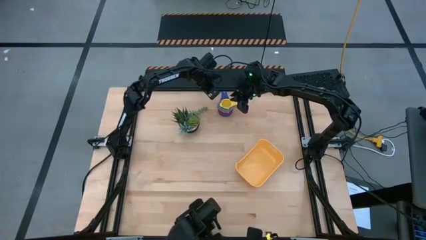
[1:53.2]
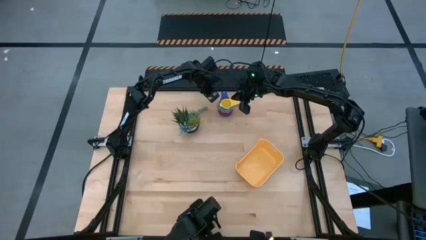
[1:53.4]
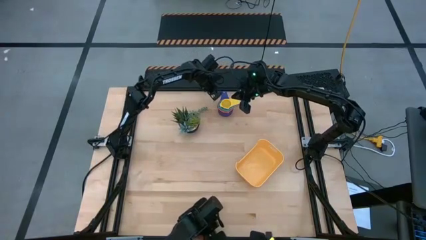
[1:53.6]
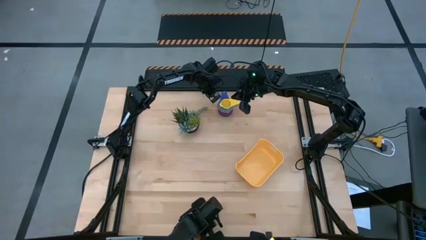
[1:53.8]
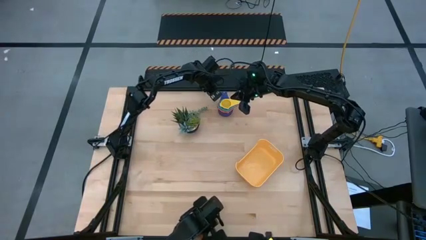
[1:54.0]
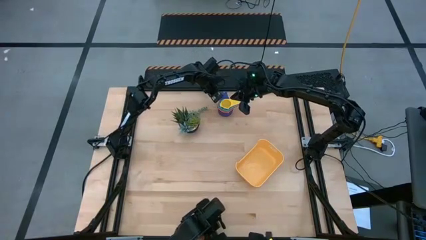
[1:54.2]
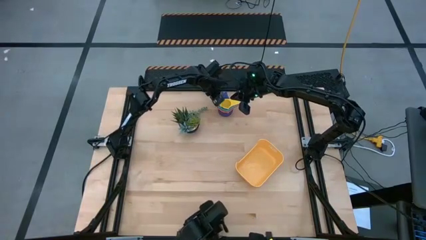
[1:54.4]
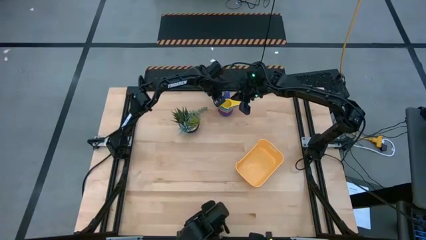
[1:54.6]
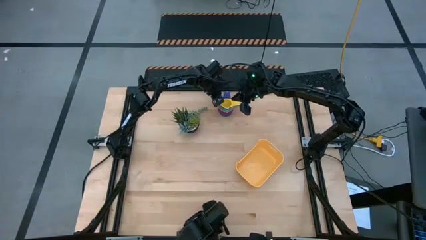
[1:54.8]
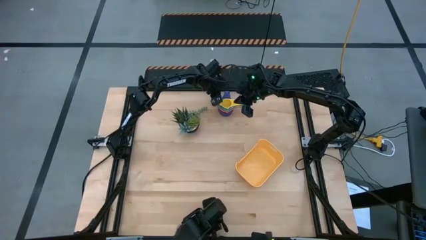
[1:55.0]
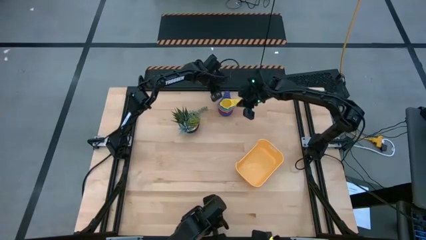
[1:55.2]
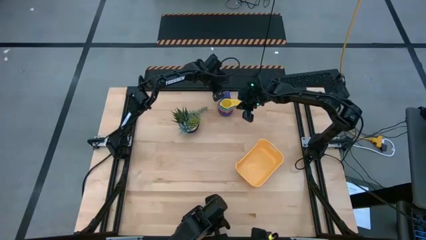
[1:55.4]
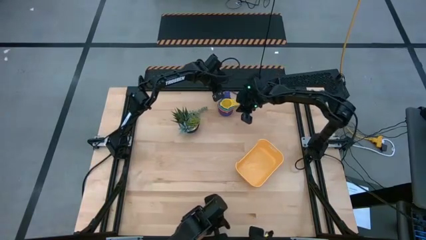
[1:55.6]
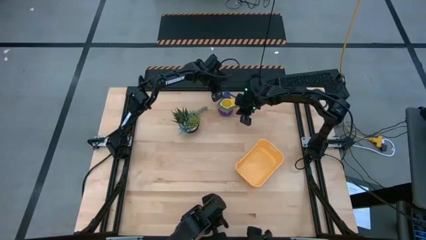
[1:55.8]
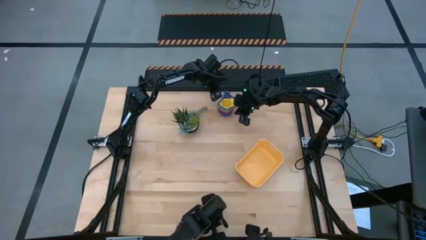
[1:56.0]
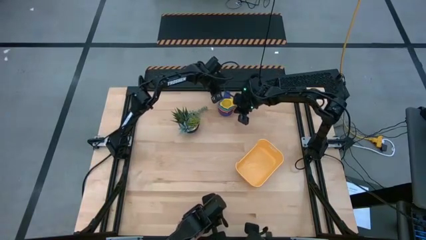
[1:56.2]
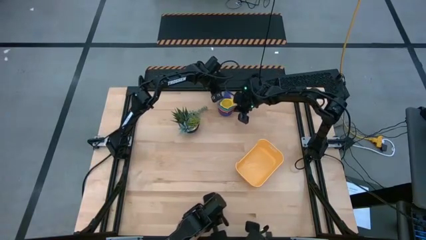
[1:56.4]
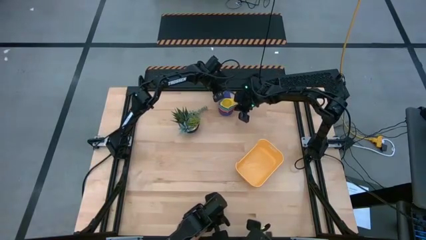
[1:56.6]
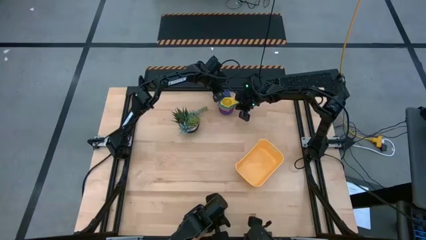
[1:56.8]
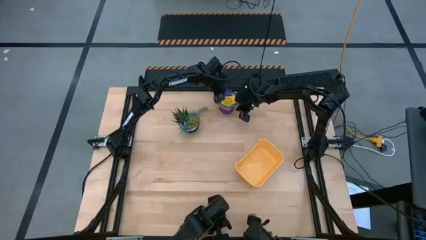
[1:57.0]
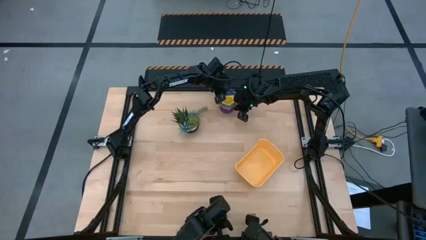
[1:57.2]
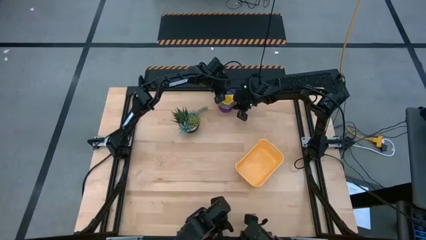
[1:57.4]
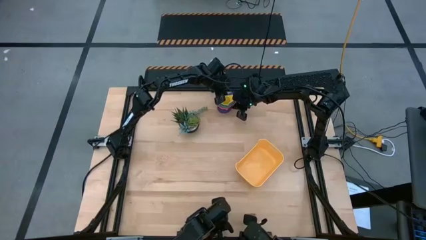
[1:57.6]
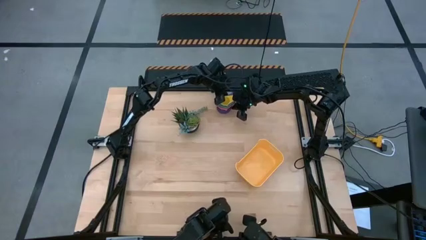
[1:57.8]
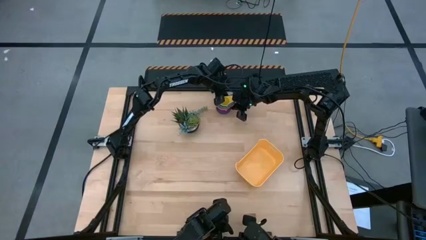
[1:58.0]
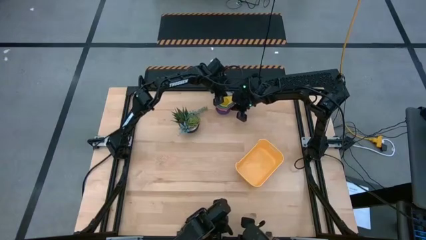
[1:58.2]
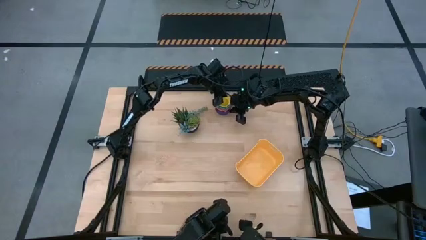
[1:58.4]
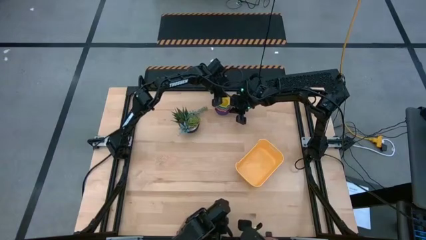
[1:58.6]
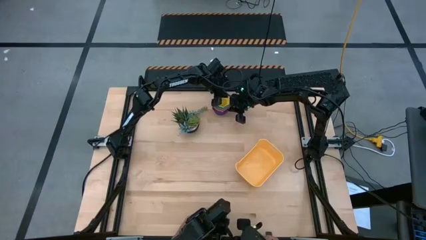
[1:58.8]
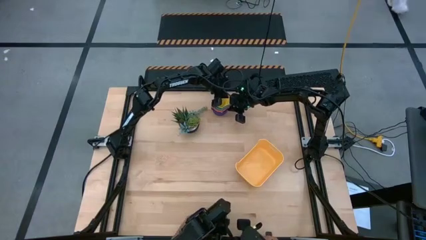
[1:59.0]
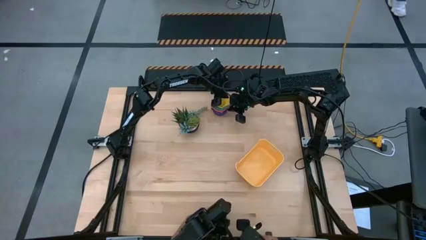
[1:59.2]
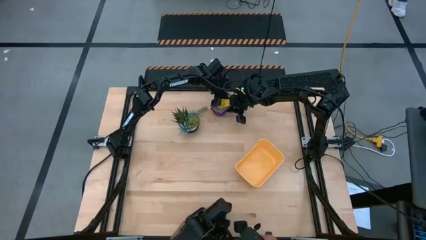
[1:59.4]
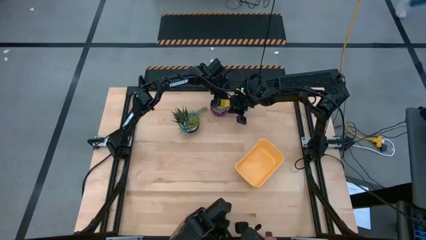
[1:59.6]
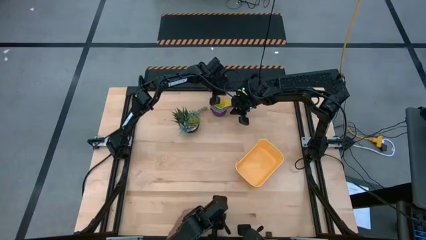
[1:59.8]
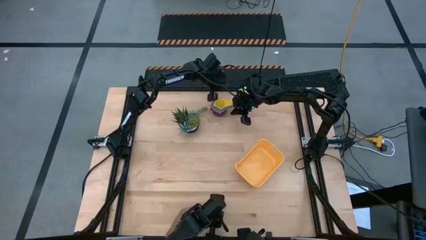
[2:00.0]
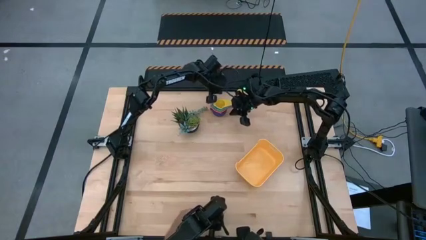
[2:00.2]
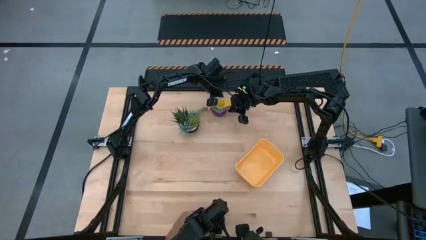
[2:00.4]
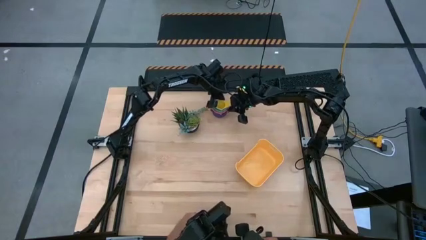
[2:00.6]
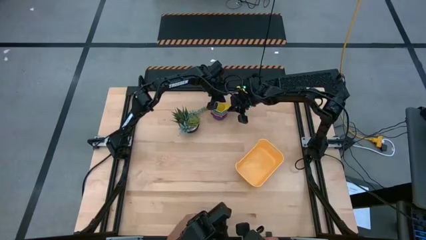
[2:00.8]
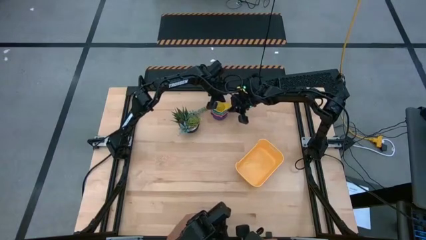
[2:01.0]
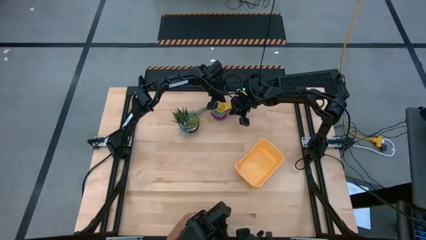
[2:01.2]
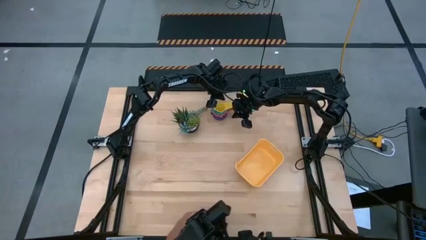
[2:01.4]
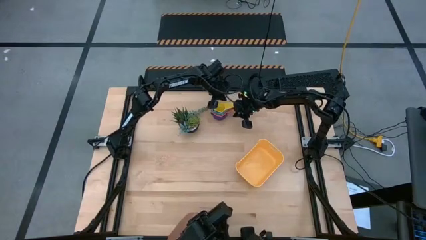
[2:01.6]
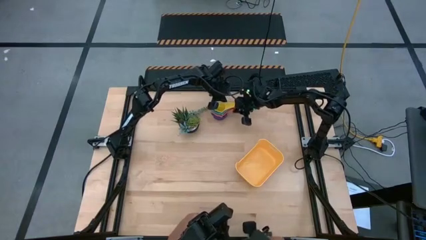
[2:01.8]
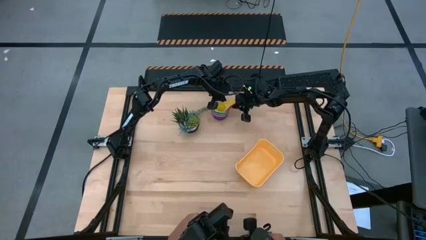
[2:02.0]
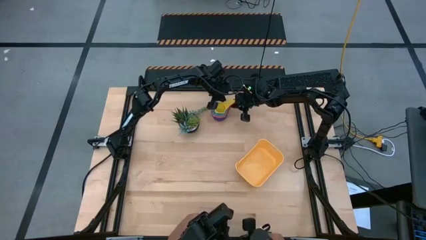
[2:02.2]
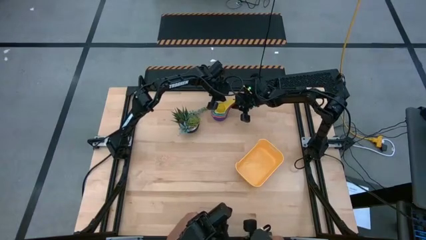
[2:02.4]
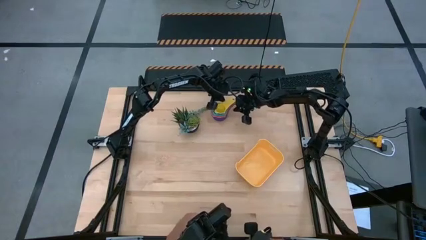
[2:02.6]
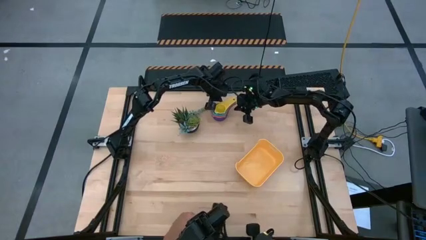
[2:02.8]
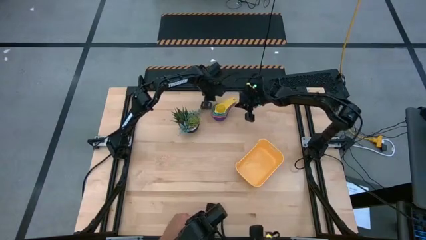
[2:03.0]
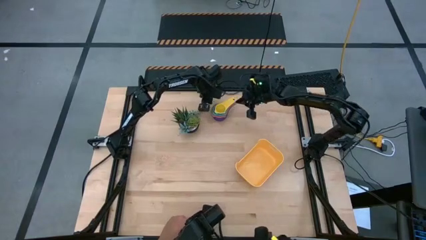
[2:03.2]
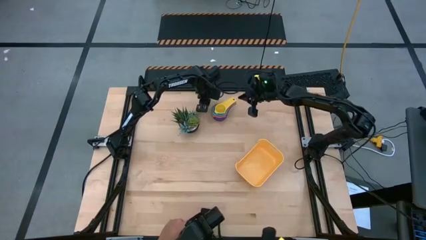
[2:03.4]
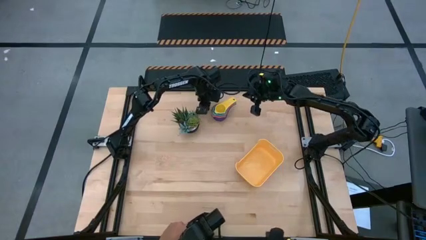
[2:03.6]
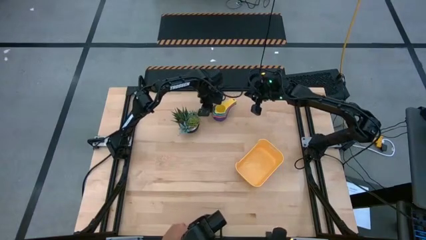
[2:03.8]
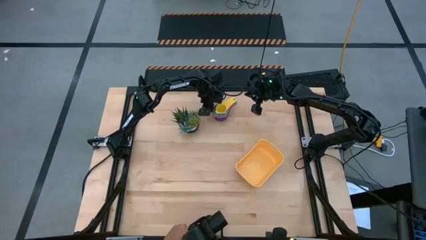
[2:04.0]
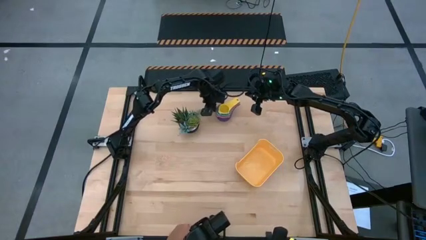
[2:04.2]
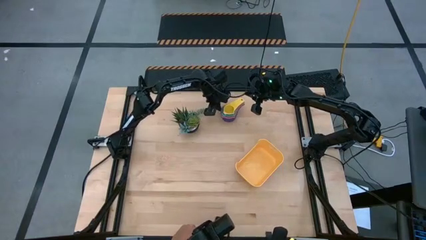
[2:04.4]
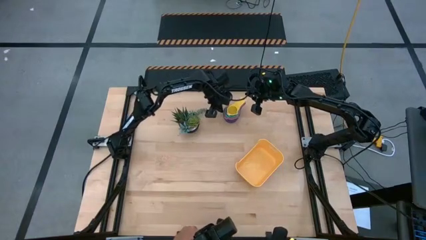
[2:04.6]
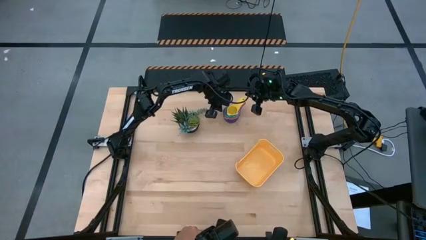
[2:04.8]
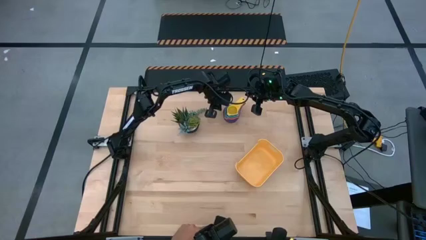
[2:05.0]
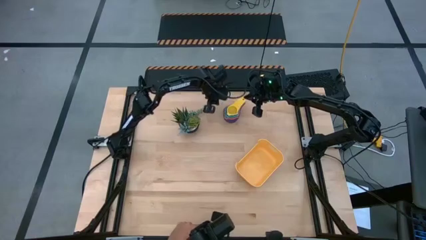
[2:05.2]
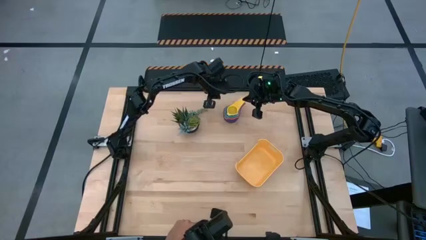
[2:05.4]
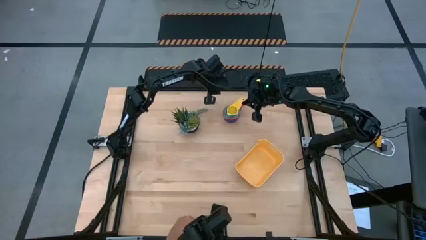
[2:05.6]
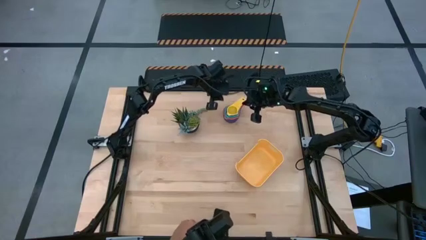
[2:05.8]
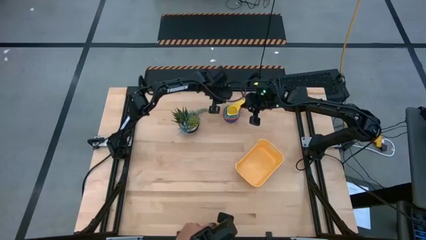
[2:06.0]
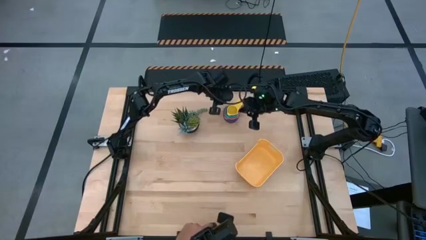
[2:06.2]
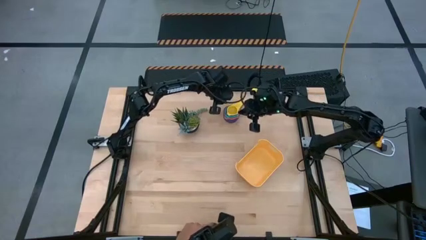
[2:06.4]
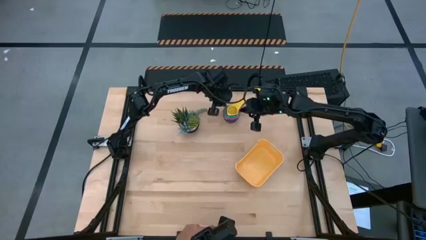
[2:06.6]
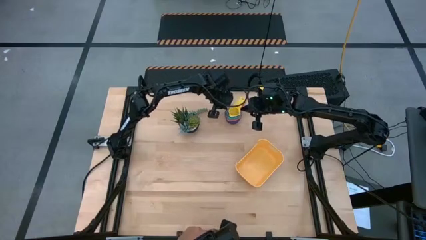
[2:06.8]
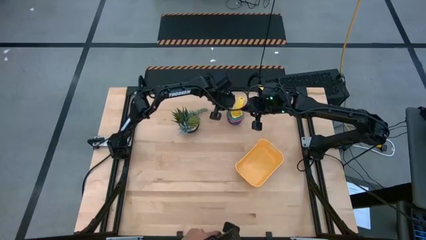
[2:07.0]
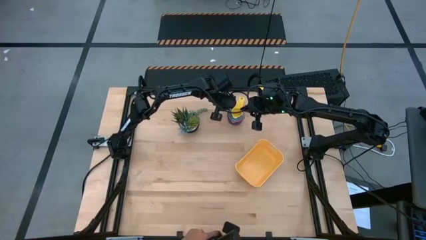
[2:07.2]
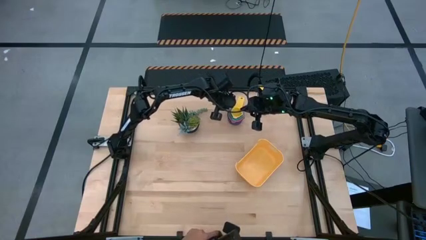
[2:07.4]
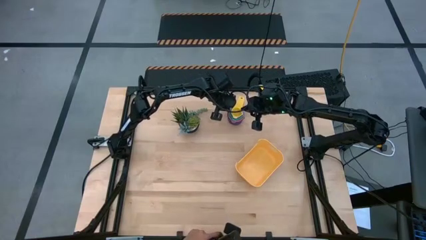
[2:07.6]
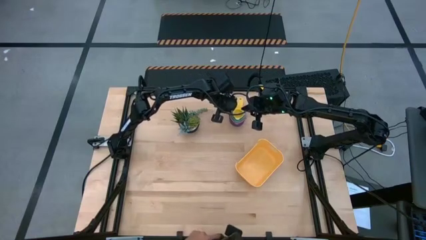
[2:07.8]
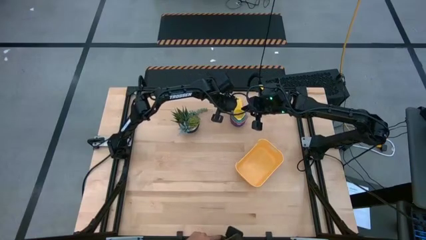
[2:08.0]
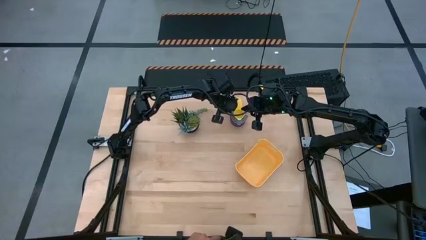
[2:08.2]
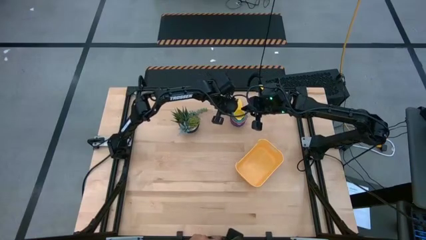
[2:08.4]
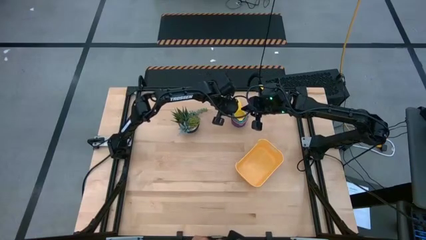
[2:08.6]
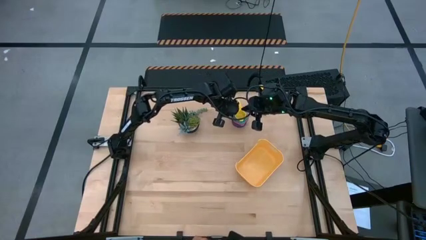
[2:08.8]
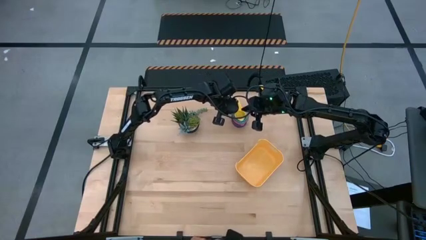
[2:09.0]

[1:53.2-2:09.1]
Task: Nest measuring cups in basket
Stack the measuring cups on the purple measuring cup

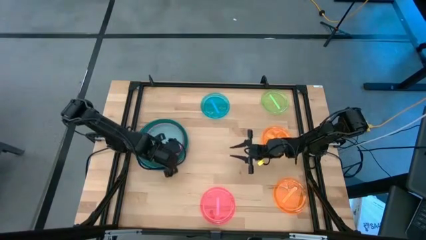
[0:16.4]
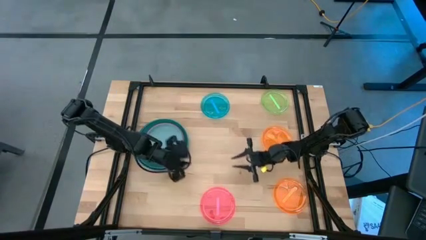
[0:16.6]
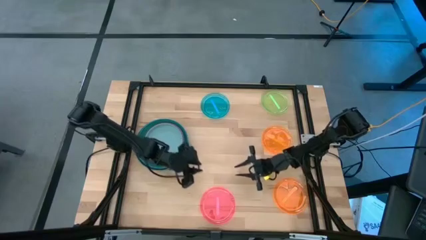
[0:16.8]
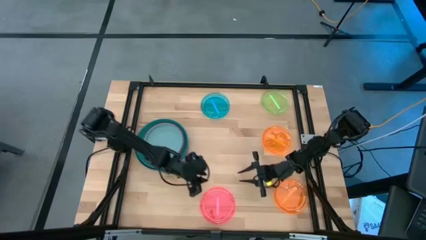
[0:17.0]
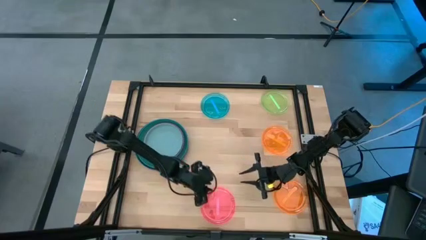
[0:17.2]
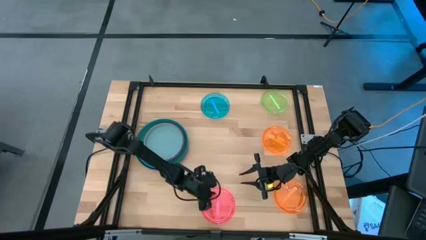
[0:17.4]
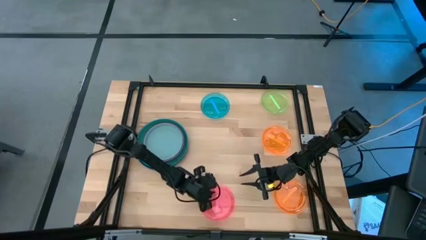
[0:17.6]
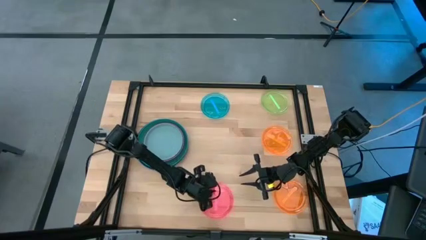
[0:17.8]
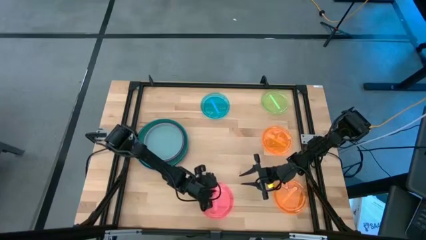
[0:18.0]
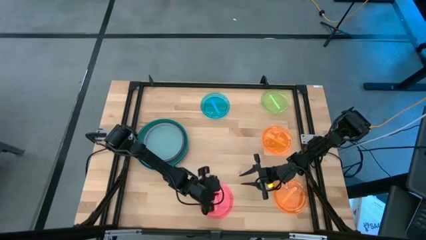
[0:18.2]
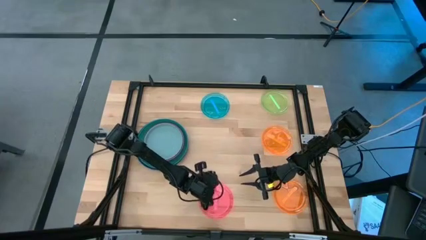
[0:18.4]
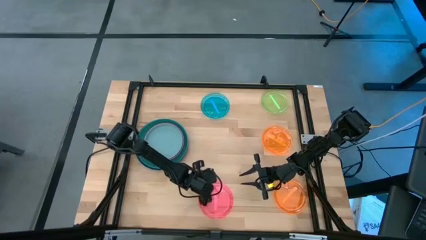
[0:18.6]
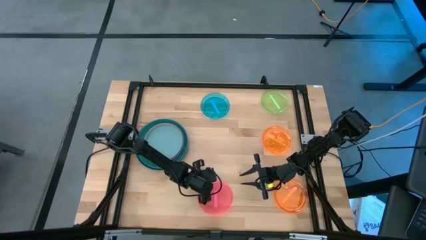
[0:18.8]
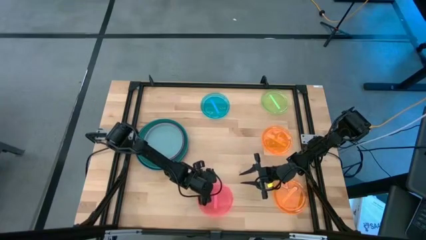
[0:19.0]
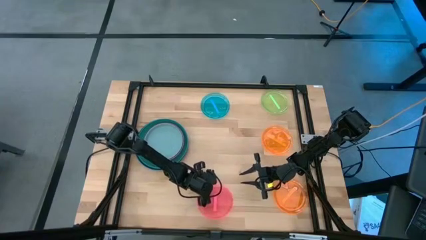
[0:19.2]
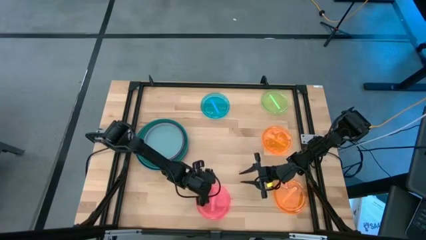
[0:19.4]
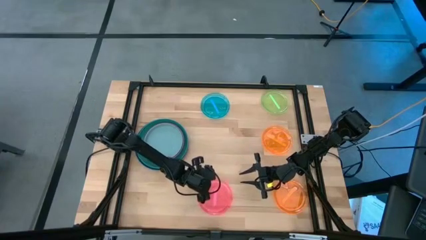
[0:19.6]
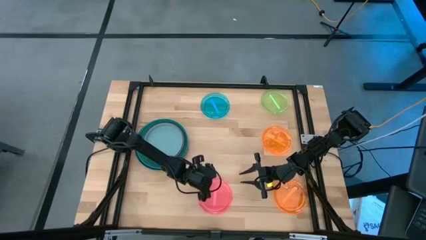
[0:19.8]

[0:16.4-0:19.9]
Task: Stack plastic plates
Stack the pink plate on top of the gray plate
